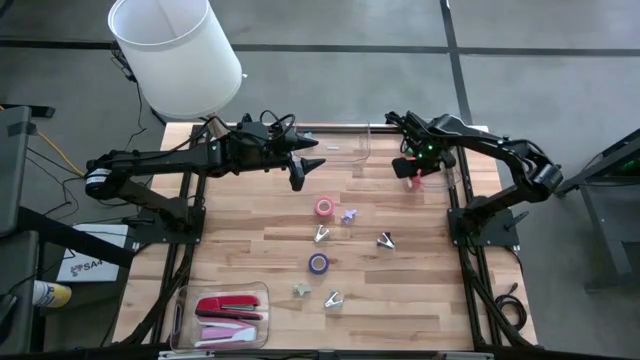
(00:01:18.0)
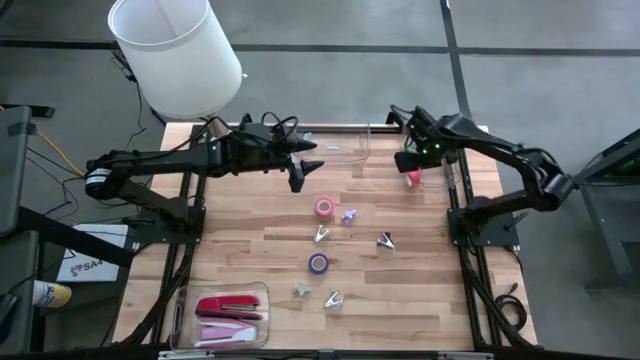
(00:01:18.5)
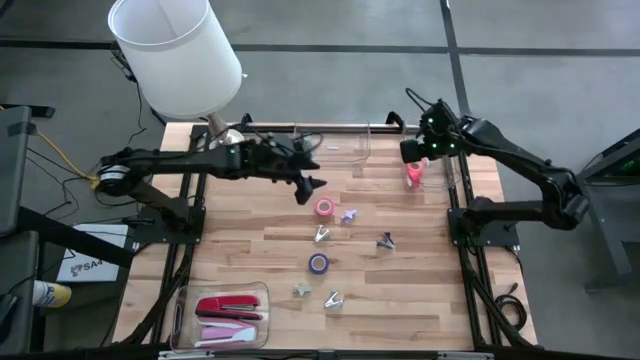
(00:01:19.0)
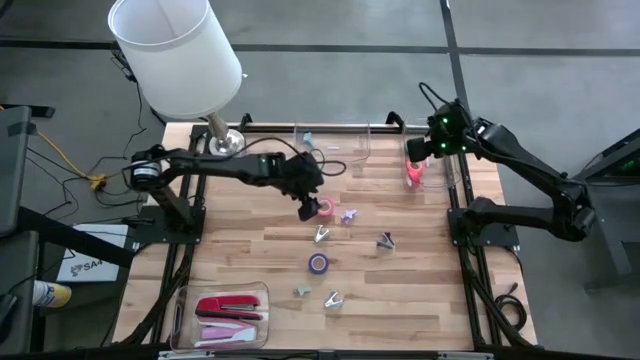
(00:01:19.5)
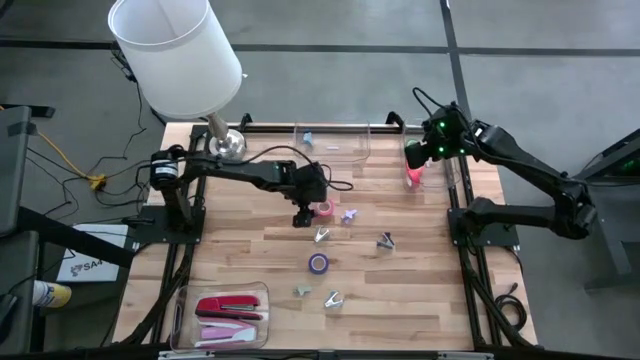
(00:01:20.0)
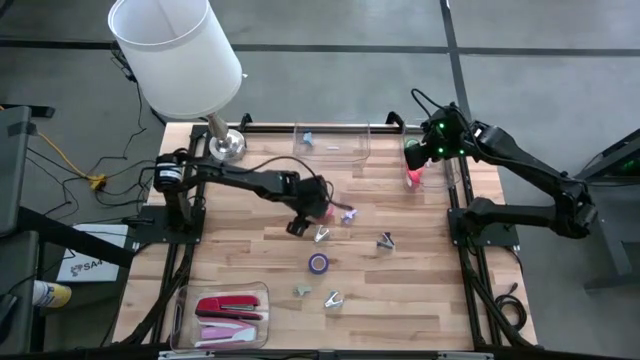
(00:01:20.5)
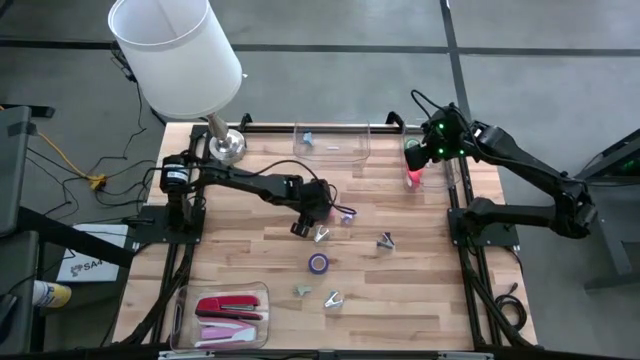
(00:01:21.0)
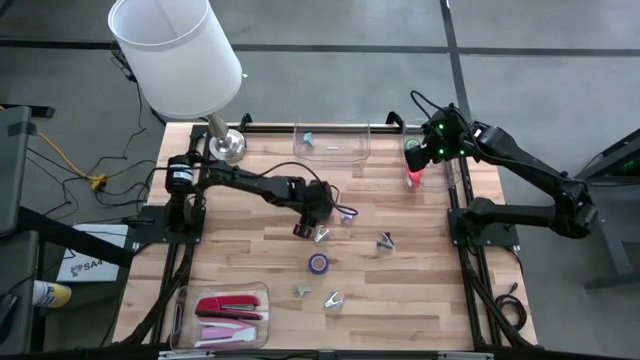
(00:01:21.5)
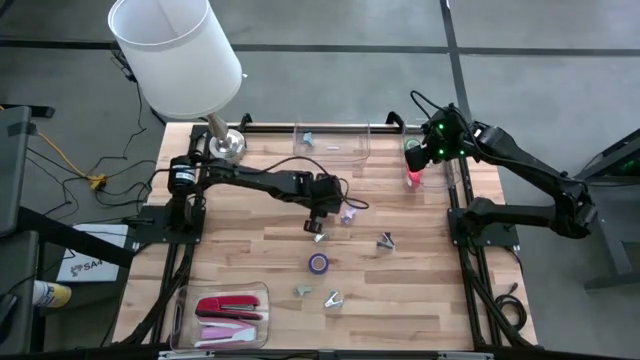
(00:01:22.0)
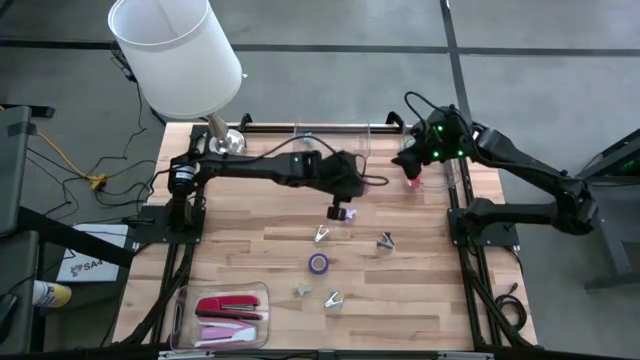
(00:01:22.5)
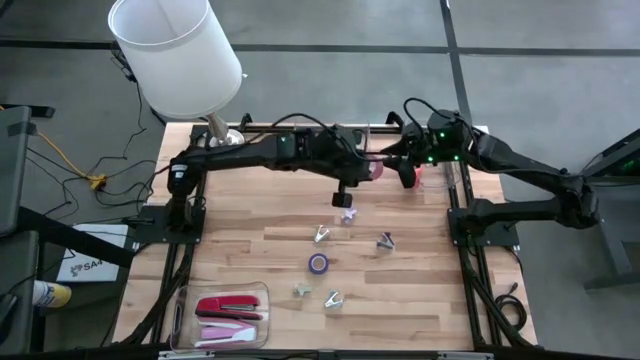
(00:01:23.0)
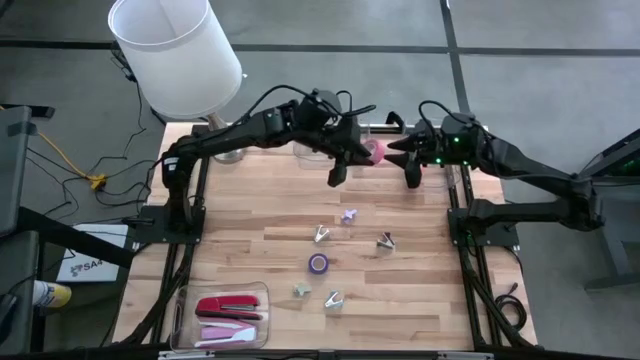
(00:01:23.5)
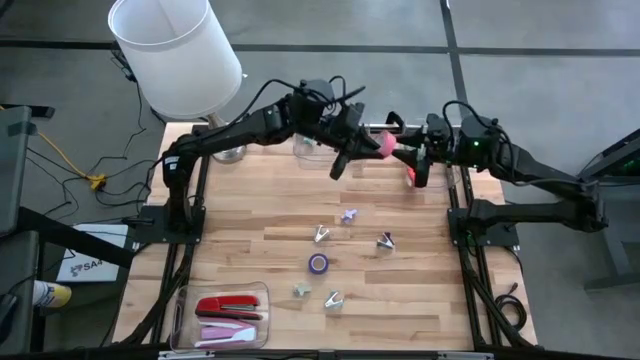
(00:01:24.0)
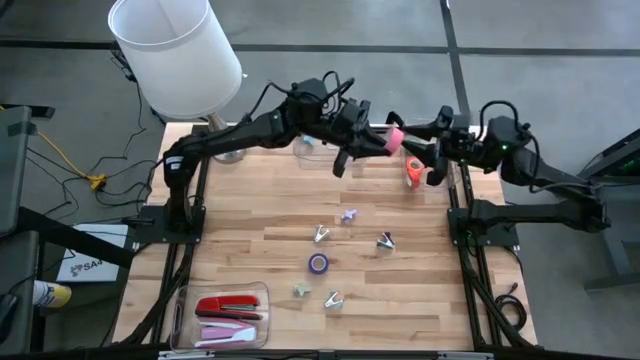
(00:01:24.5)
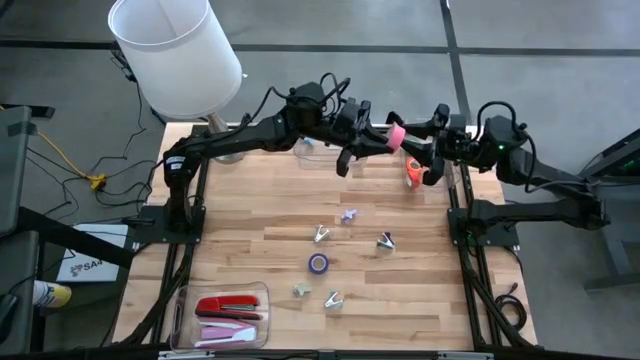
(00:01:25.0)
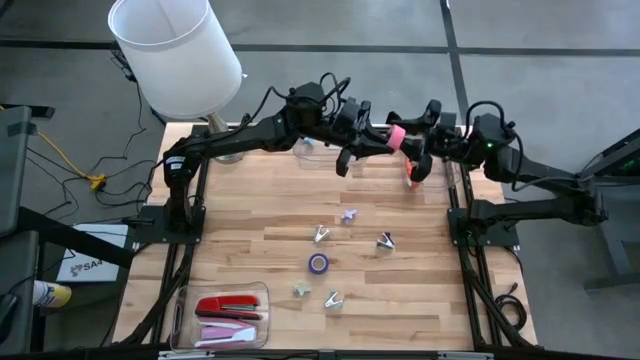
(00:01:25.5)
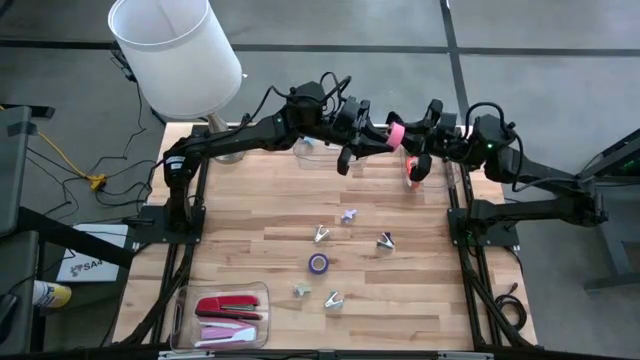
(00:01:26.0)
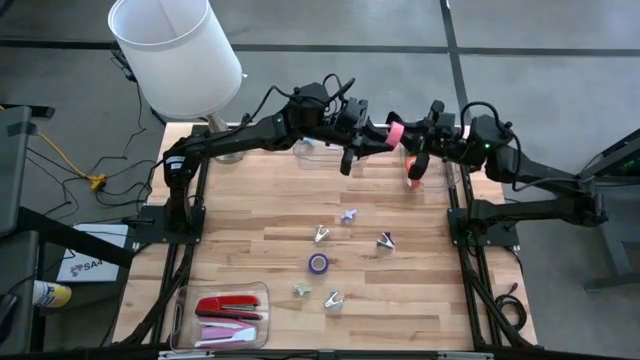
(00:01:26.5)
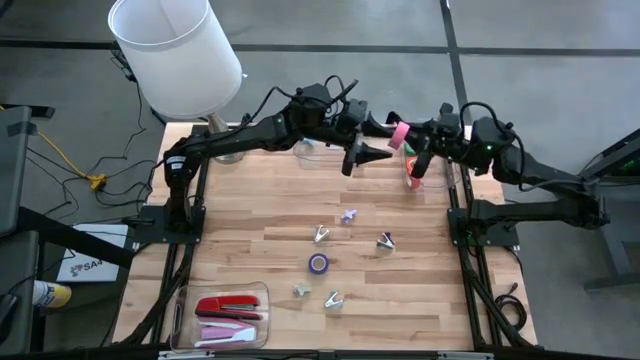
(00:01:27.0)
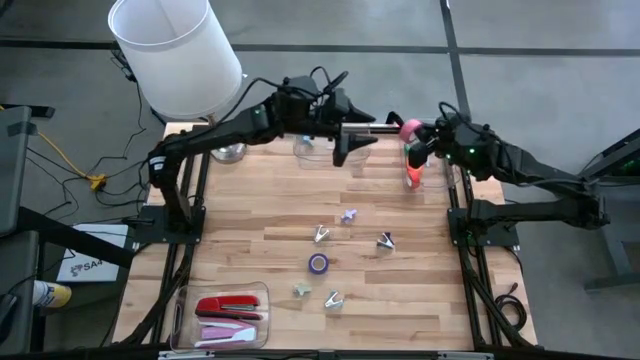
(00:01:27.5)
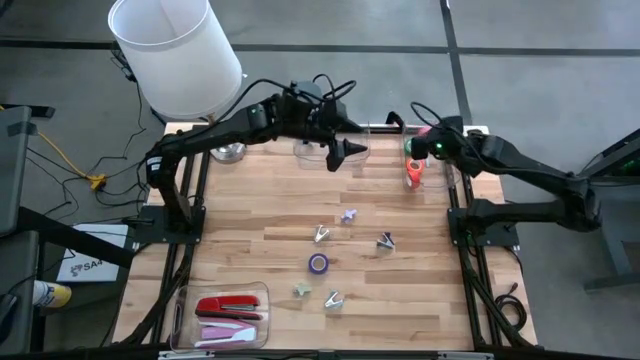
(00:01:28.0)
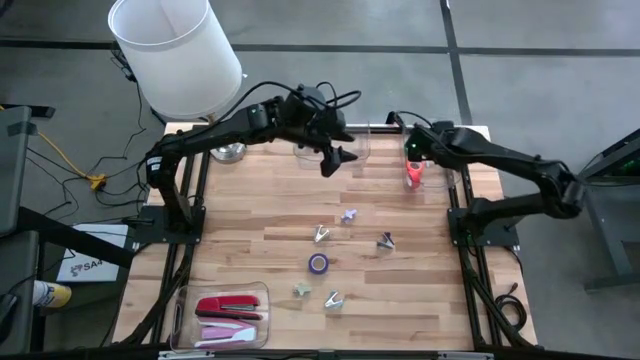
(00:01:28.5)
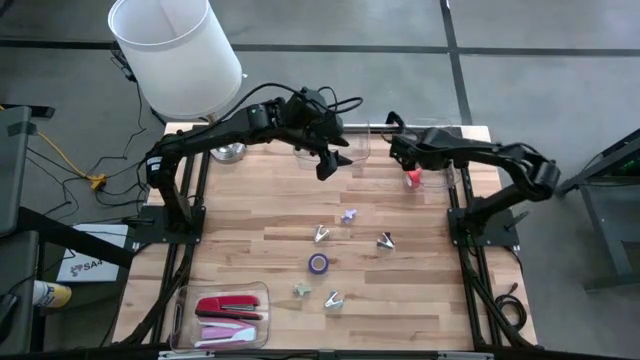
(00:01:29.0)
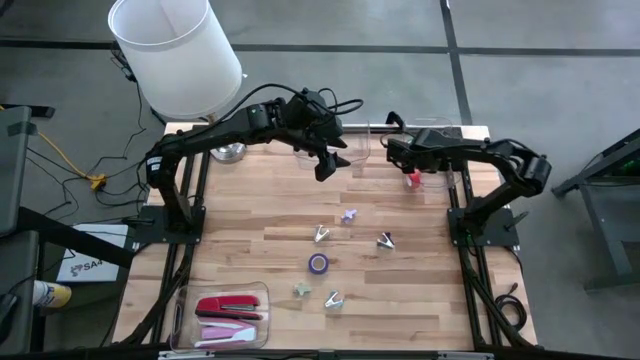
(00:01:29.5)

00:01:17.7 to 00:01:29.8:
Task: Pick and place Stapler, Stapler remover, tape
Put the pink tape into the top right transparent bin

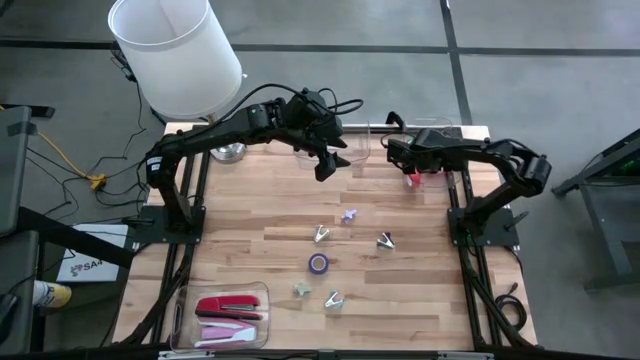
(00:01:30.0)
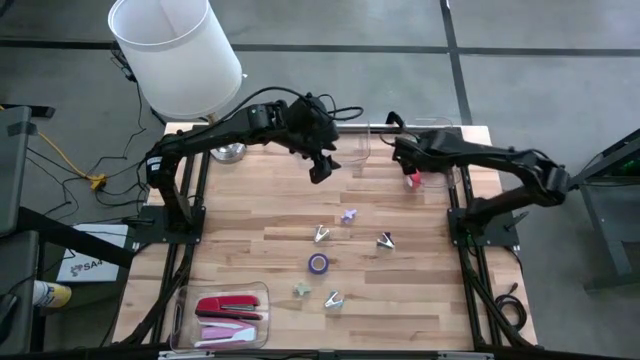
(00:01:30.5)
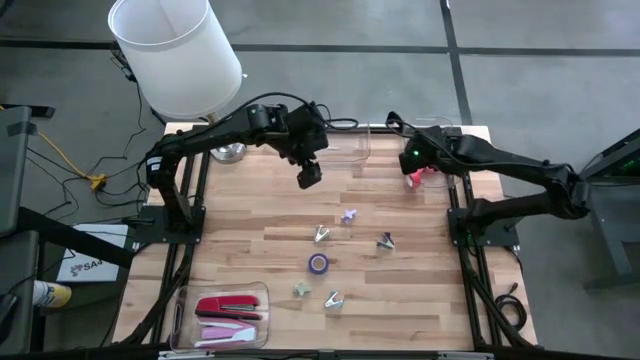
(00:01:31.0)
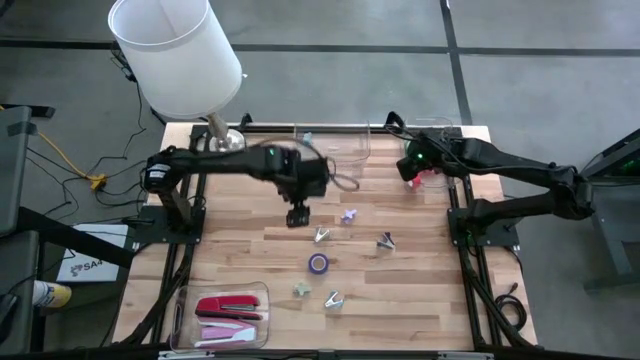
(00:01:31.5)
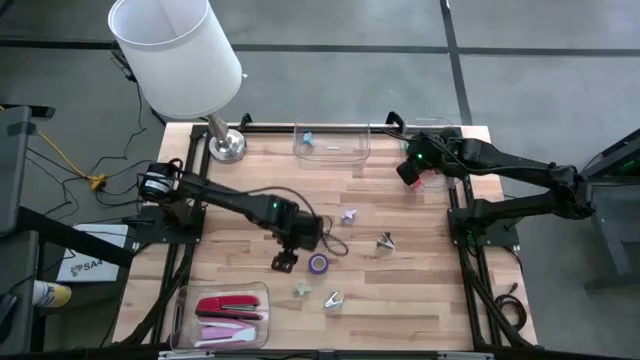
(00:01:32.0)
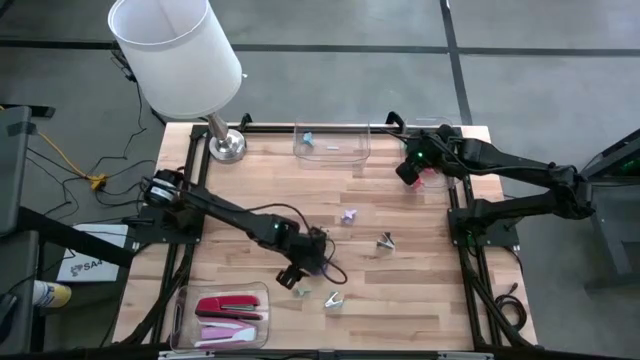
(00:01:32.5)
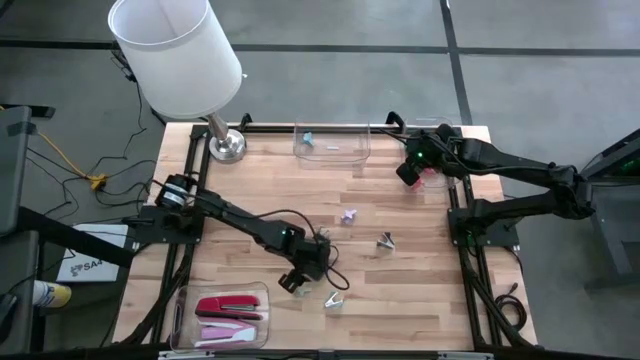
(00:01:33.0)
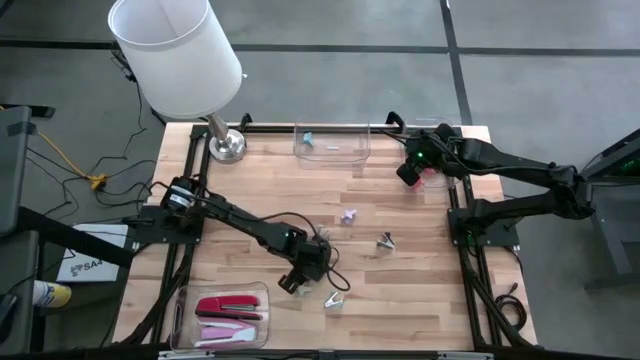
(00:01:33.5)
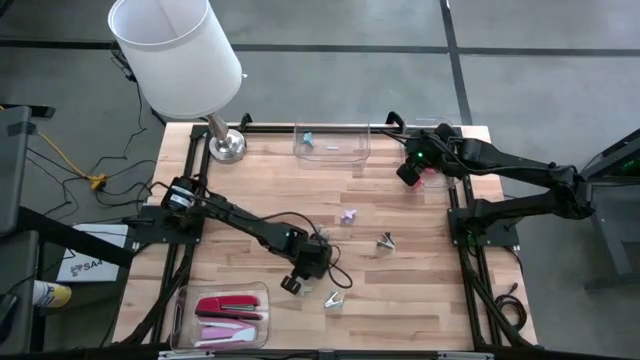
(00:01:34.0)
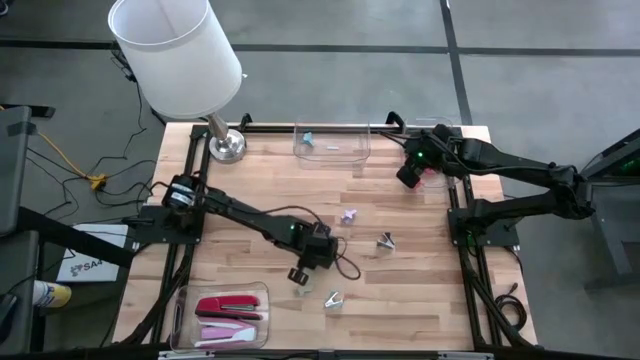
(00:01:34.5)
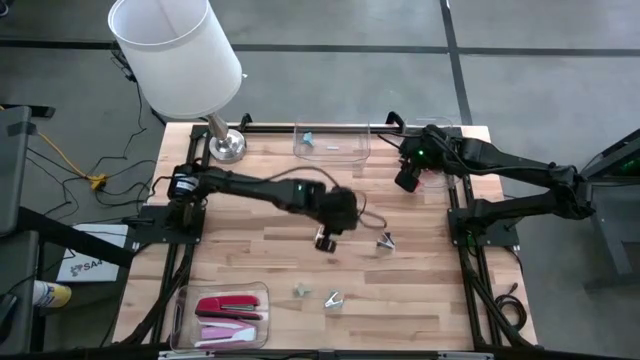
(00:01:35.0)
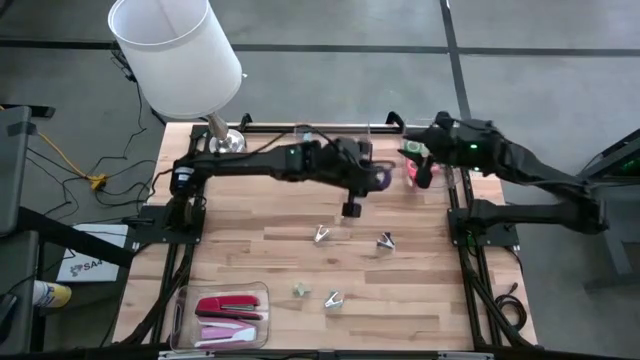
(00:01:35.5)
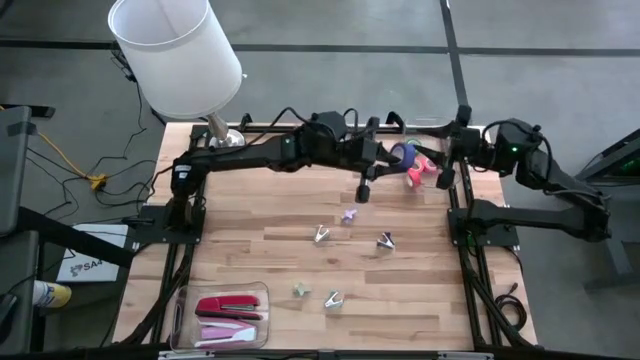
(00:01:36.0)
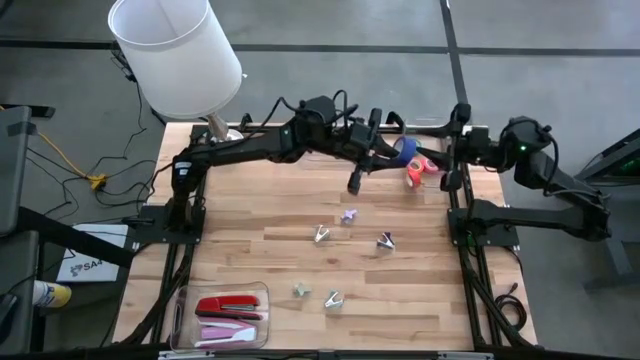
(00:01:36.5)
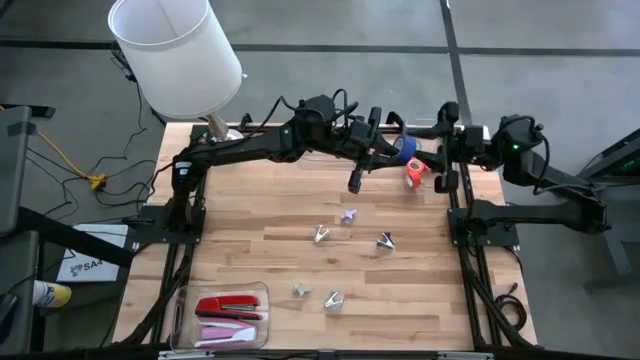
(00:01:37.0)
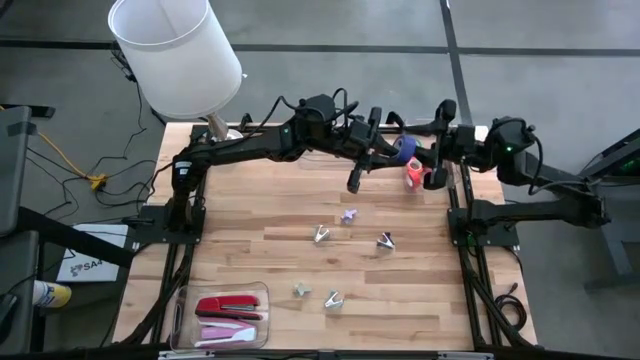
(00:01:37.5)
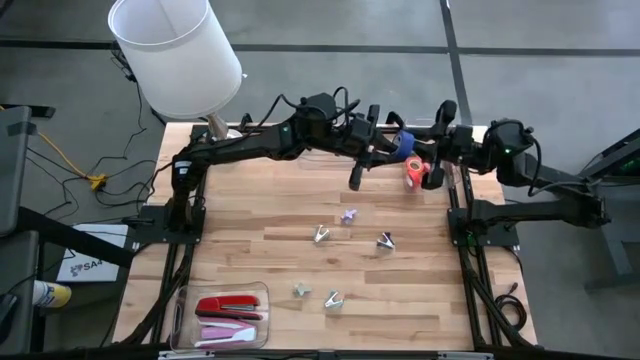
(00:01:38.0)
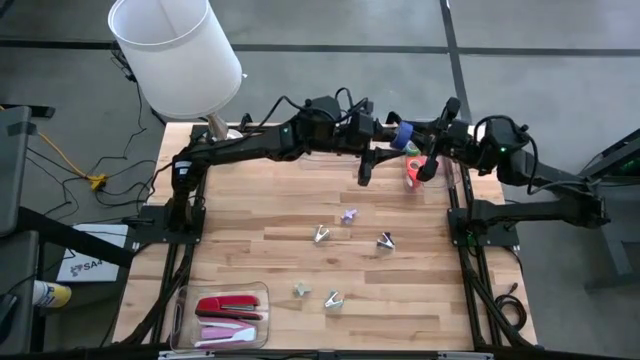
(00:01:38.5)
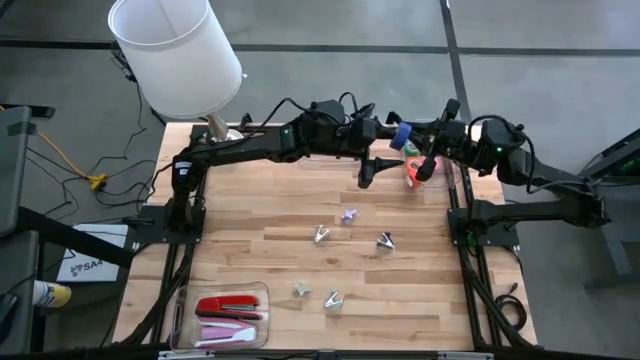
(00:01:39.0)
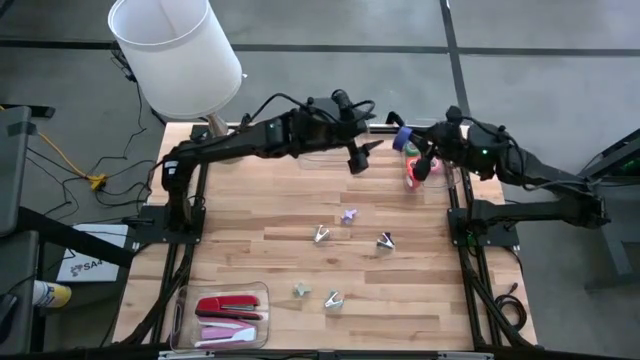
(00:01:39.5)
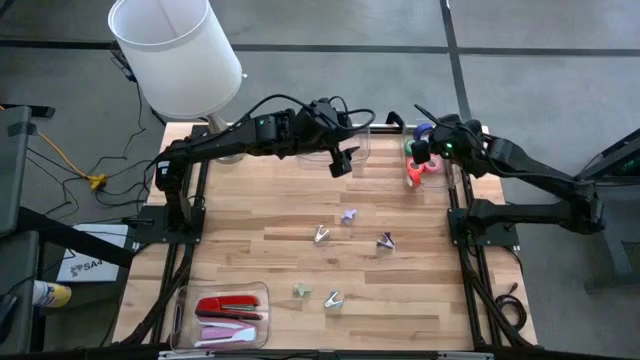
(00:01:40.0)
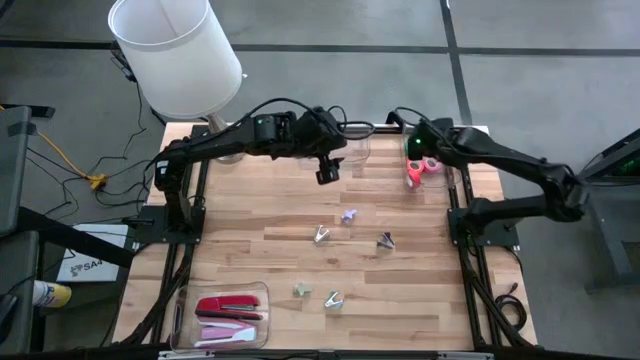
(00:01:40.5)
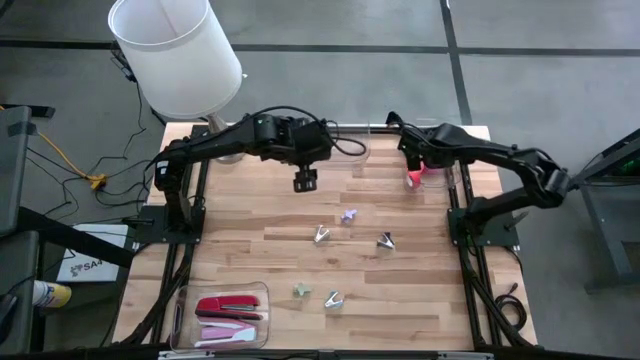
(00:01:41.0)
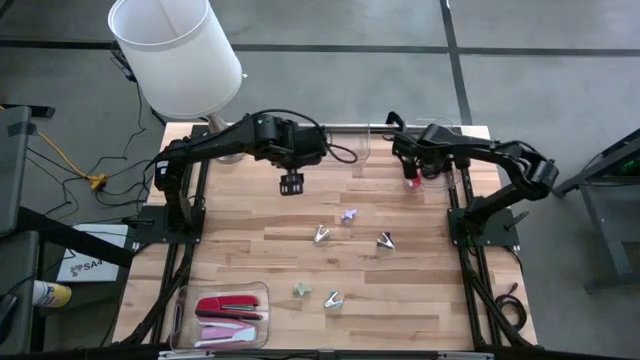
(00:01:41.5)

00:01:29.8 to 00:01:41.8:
Put the purple tape into the top right transparent bin
